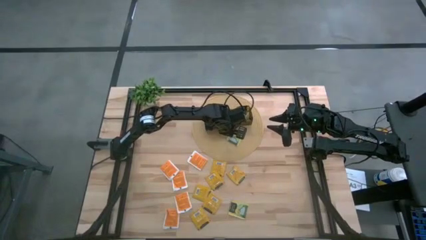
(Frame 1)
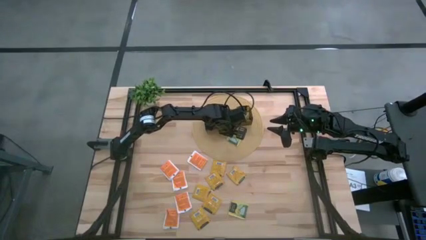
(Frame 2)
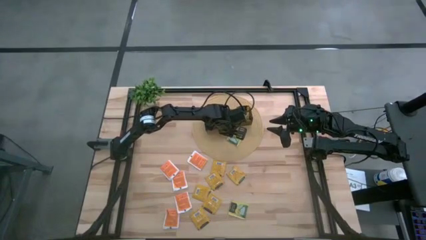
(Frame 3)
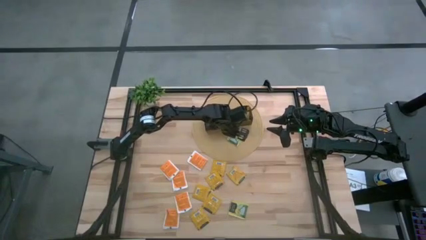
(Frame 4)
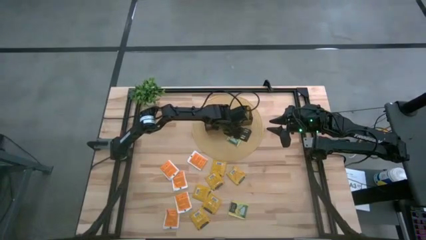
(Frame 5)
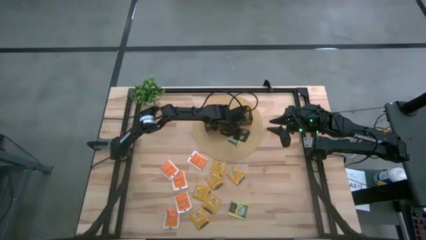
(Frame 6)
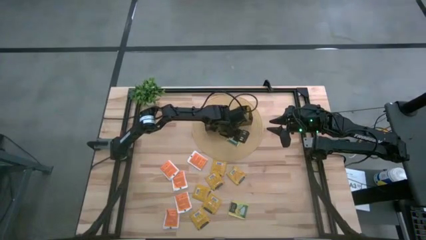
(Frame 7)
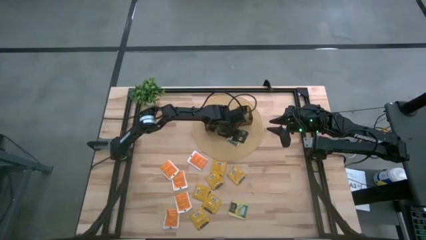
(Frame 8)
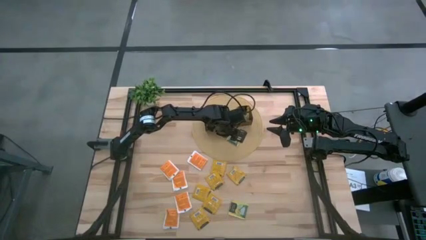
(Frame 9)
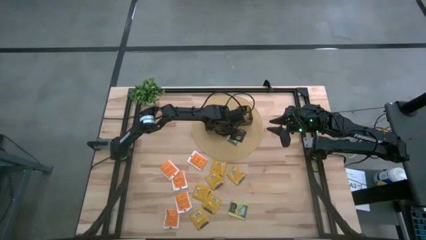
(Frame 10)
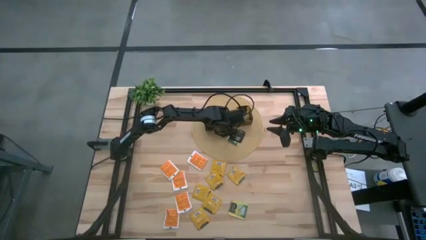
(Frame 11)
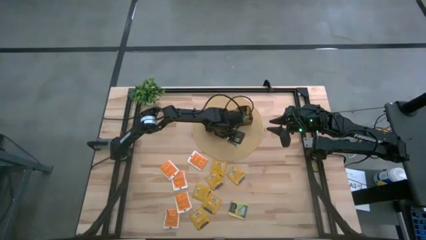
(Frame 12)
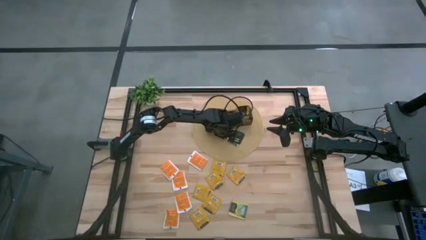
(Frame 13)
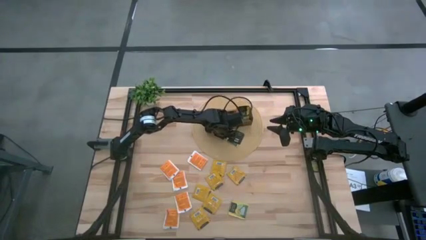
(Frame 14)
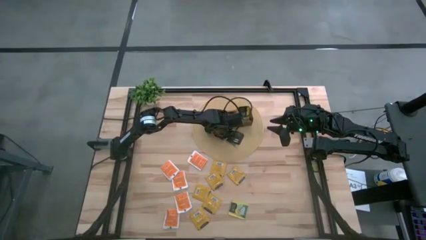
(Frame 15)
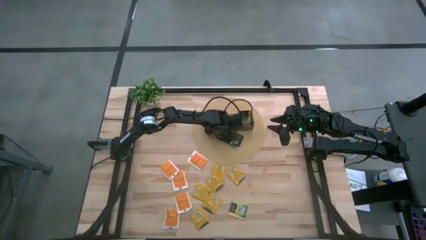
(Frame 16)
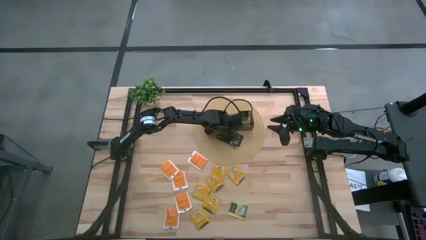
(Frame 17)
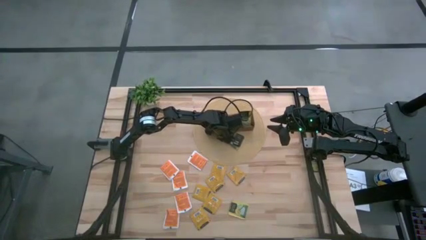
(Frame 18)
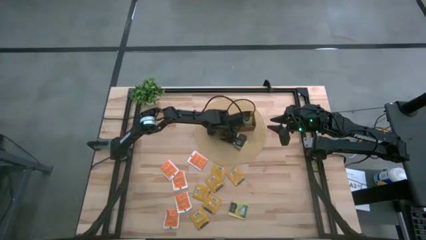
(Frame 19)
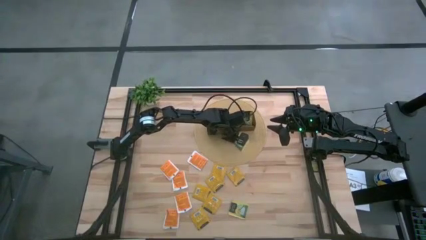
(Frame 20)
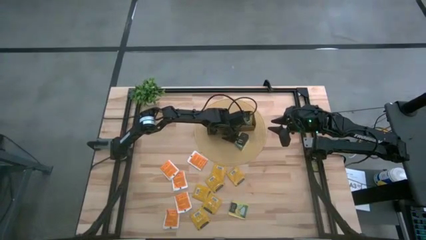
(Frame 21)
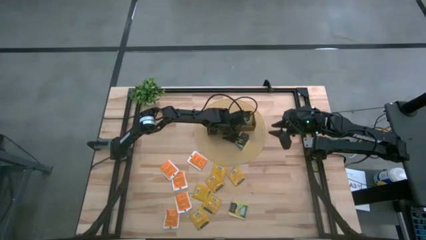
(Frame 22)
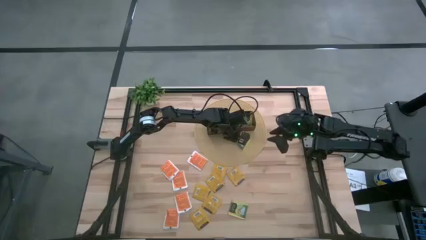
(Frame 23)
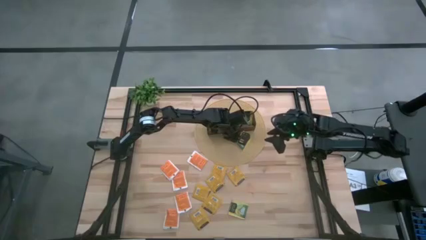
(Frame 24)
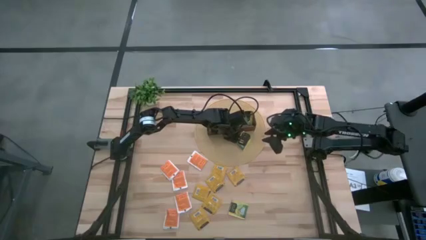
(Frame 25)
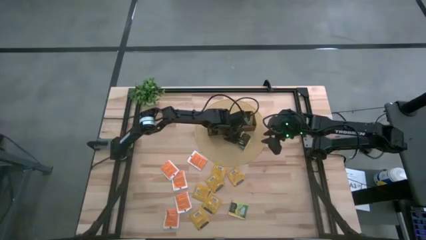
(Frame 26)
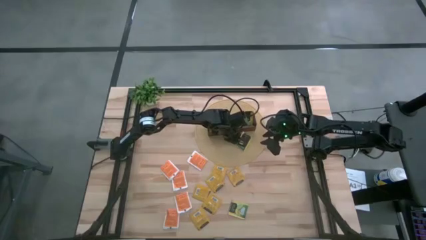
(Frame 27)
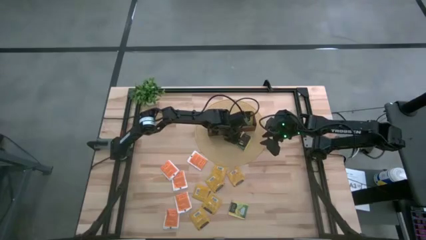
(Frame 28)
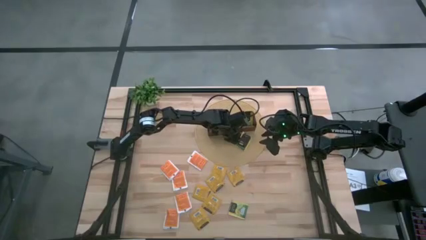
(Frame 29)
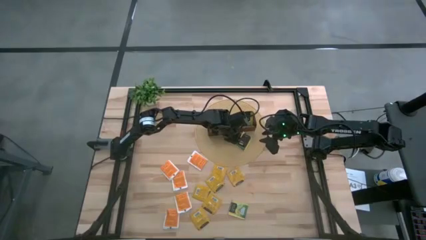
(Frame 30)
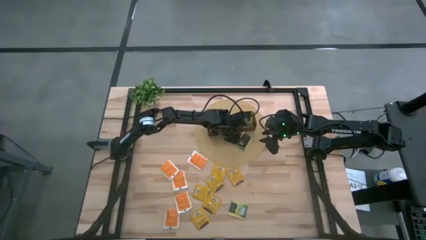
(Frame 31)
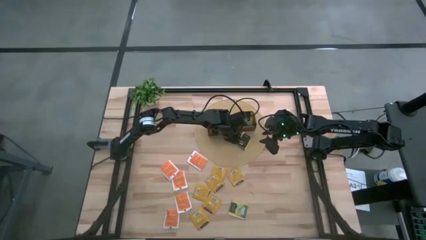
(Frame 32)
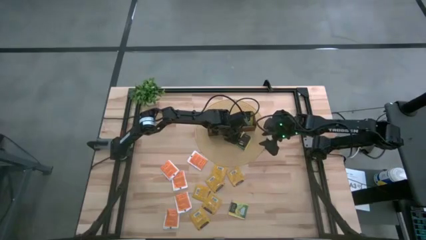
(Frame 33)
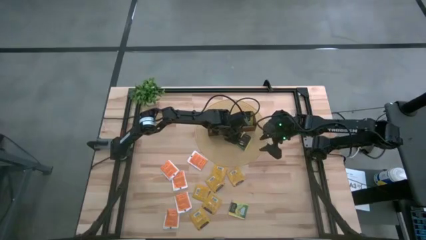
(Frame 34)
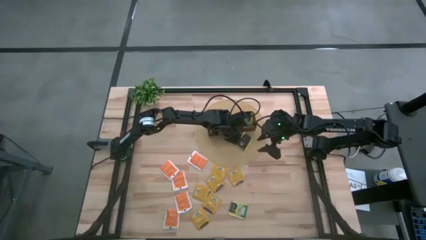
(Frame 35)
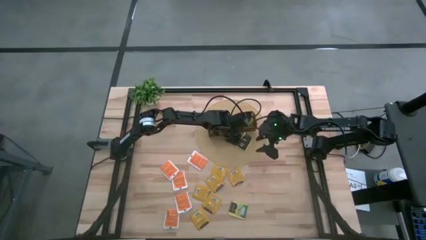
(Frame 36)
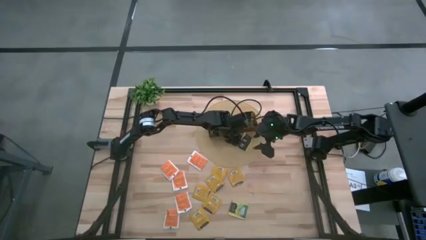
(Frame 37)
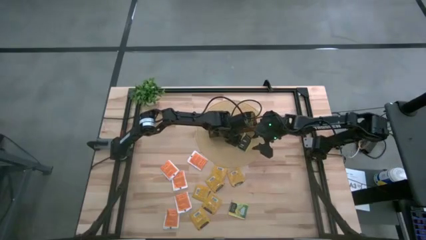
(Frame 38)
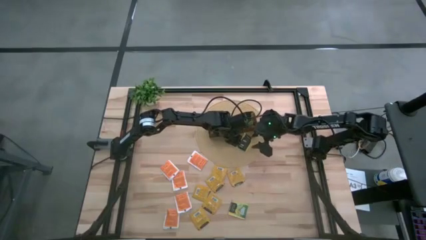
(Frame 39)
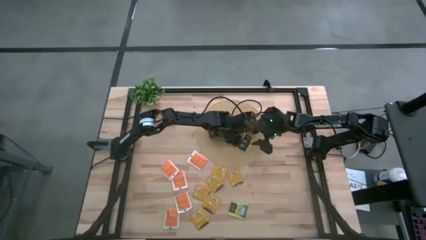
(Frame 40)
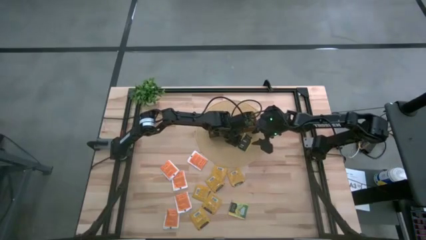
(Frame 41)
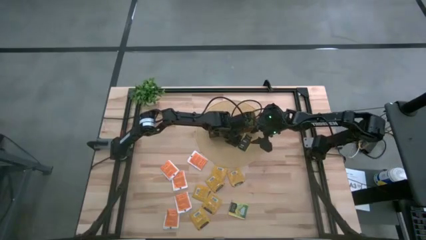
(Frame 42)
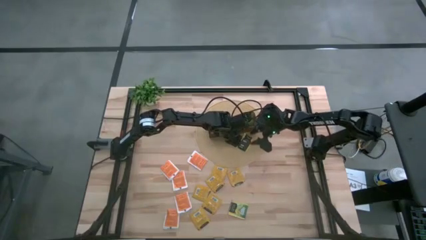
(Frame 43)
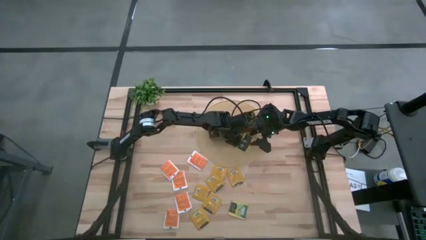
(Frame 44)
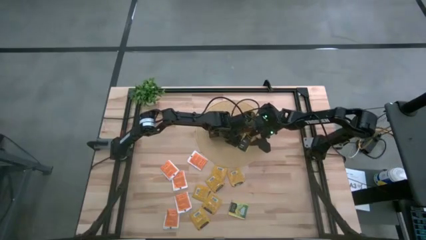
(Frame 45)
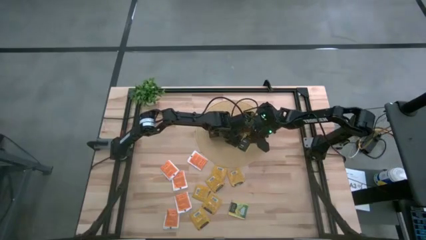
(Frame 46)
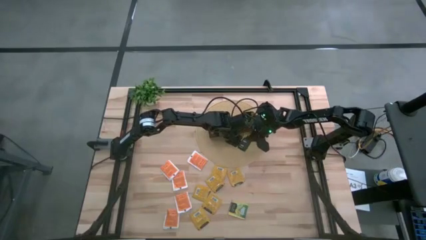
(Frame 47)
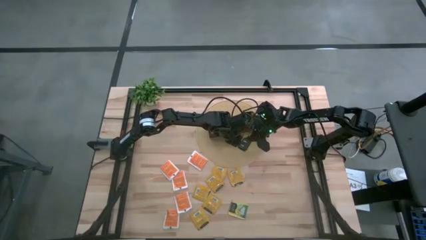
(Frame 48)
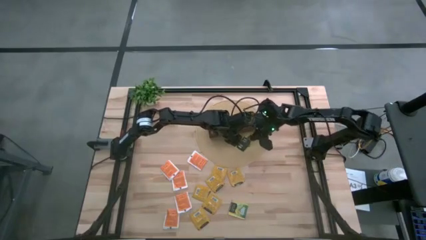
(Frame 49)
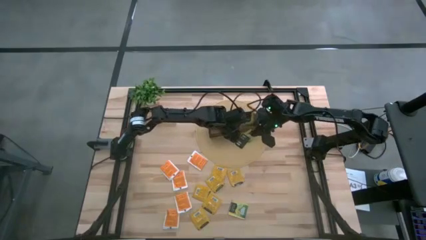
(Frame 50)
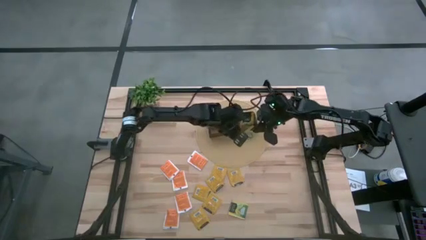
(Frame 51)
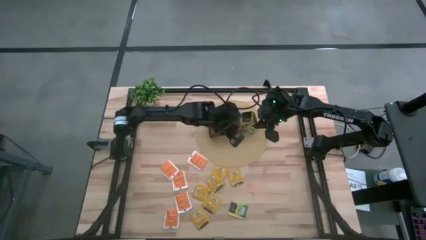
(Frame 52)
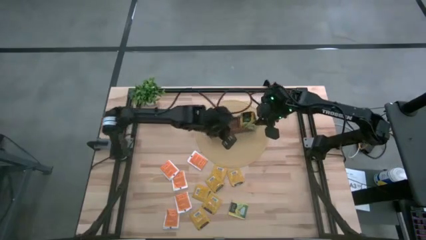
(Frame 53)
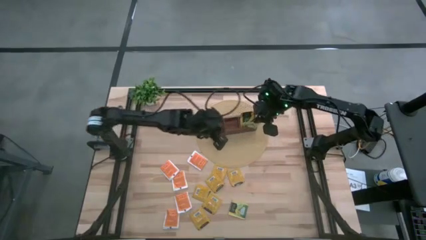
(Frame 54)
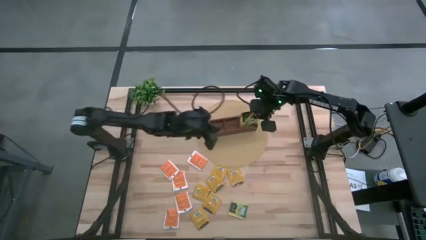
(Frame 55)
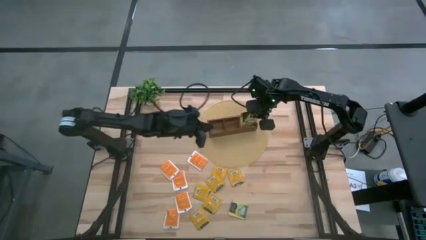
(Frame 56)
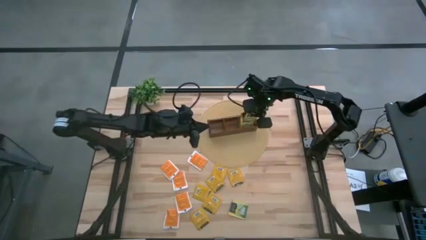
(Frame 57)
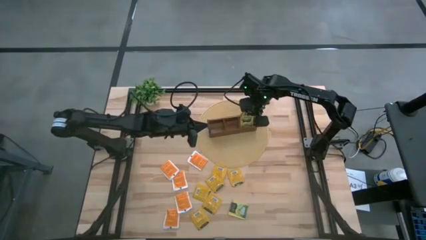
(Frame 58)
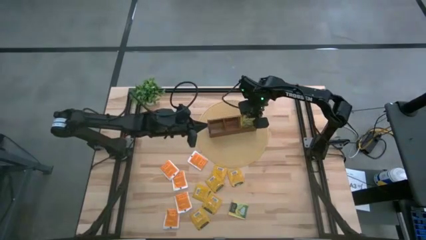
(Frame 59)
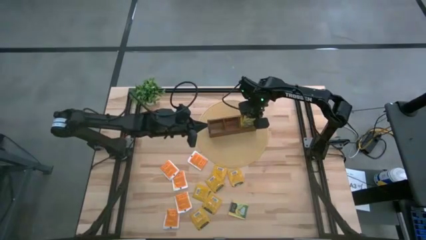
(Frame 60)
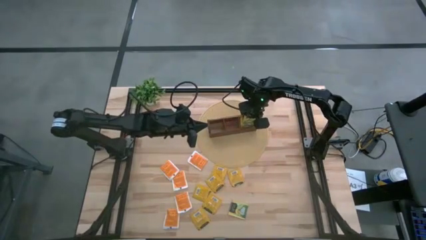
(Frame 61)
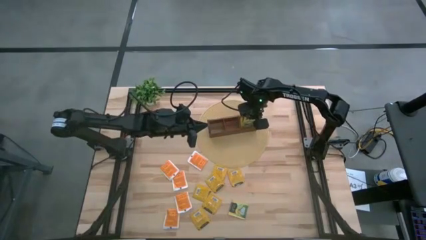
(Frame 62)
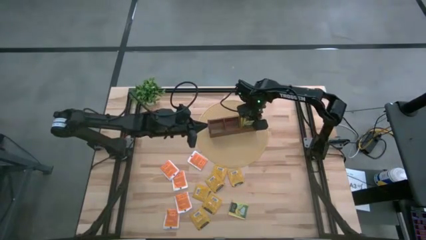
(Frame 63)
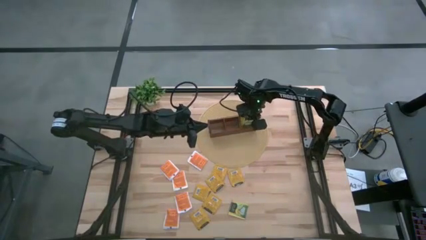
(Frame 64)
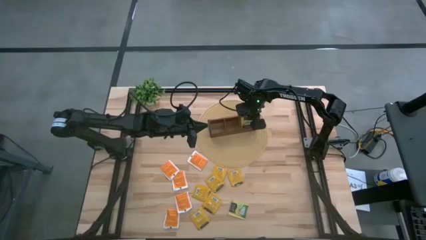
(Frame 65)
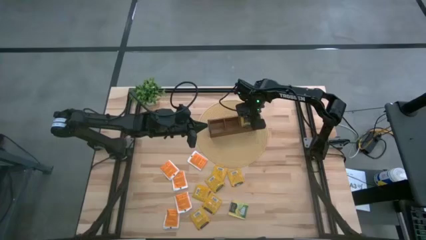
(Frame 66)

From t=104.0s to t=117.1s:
Task: Pick & Place Tea
Put the right yellow tea bag into the right section of the wooden organizer
